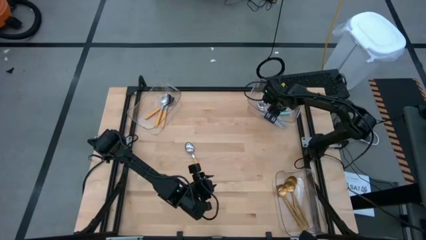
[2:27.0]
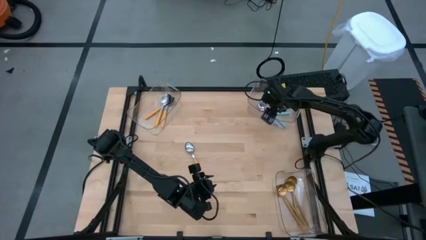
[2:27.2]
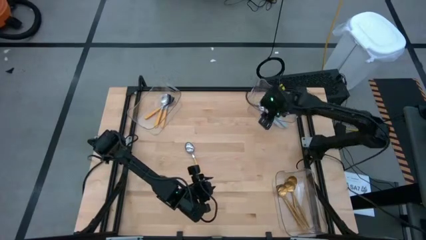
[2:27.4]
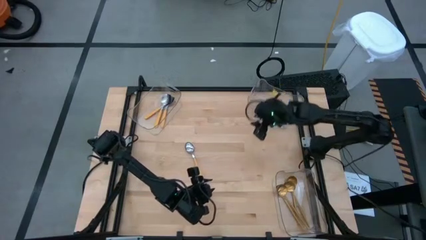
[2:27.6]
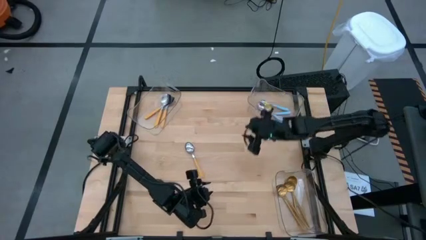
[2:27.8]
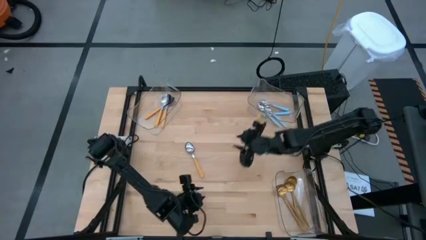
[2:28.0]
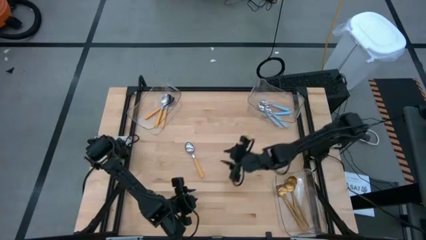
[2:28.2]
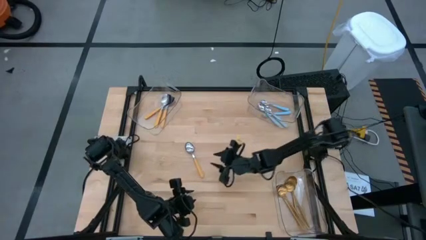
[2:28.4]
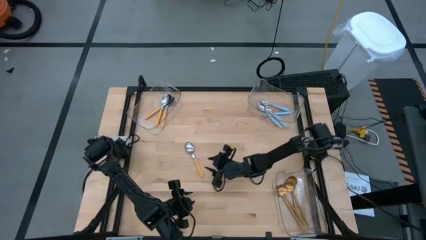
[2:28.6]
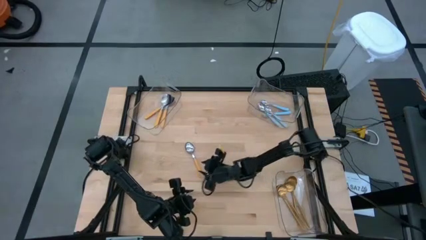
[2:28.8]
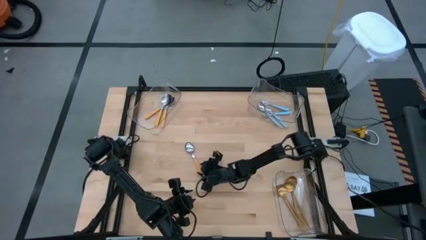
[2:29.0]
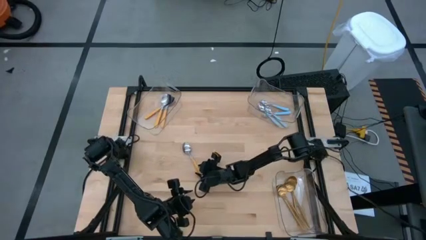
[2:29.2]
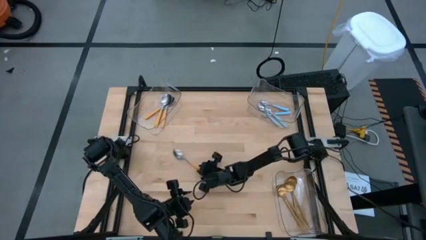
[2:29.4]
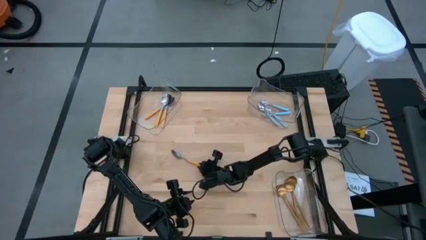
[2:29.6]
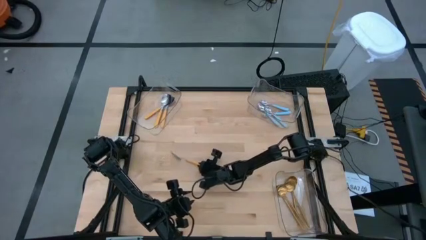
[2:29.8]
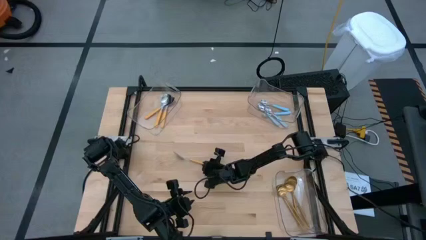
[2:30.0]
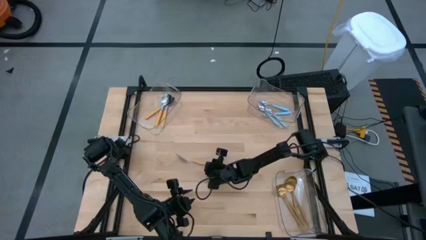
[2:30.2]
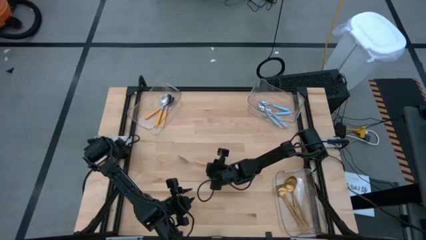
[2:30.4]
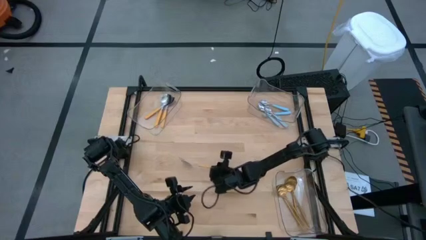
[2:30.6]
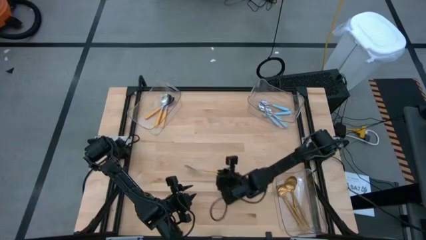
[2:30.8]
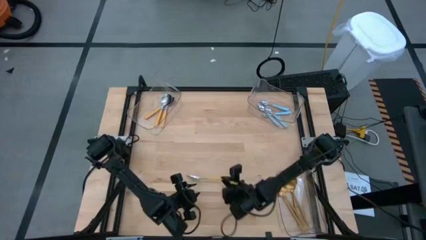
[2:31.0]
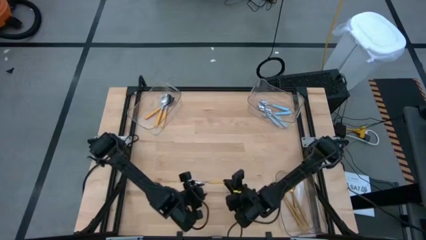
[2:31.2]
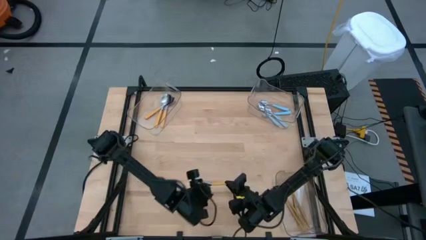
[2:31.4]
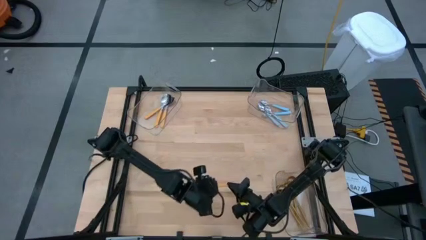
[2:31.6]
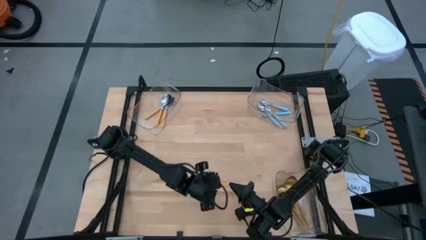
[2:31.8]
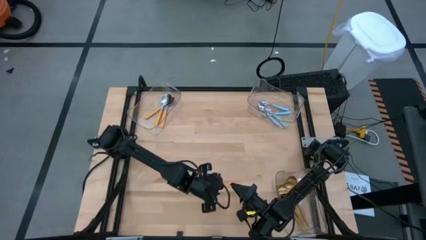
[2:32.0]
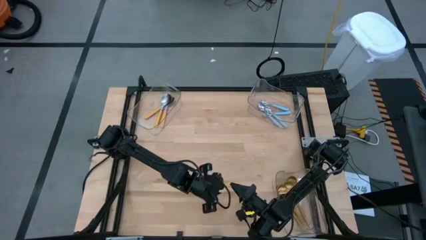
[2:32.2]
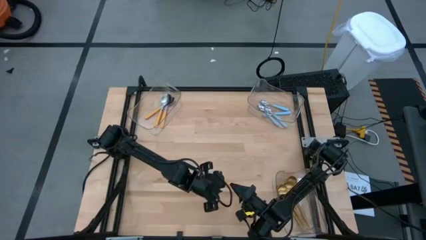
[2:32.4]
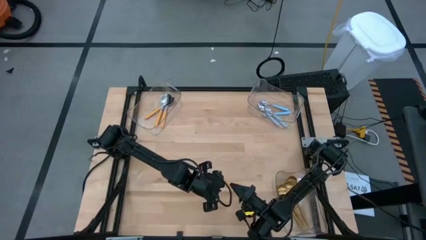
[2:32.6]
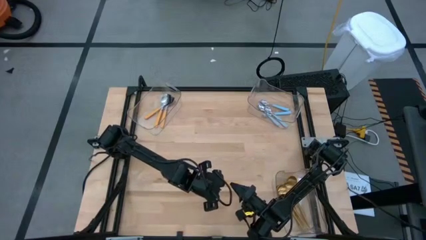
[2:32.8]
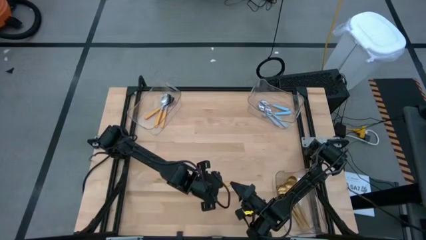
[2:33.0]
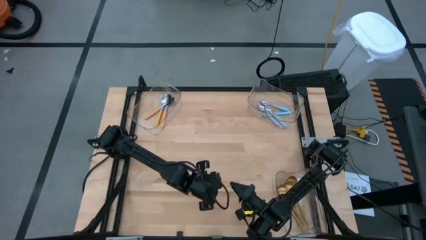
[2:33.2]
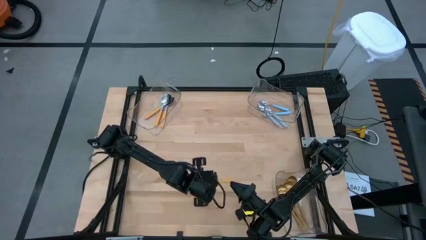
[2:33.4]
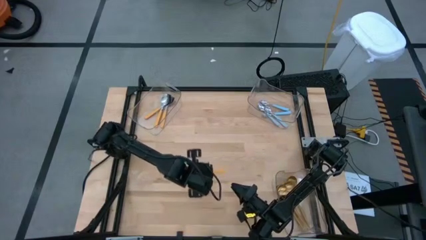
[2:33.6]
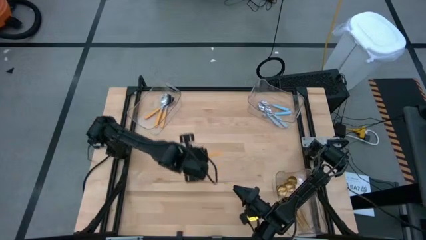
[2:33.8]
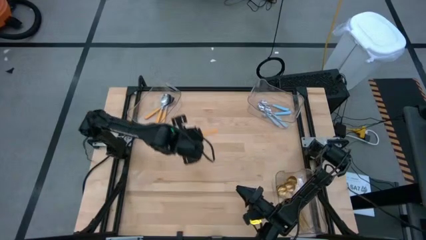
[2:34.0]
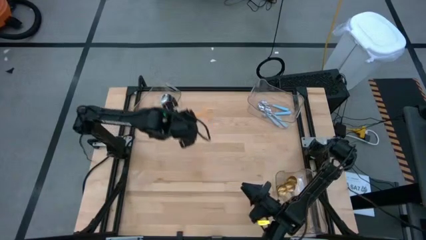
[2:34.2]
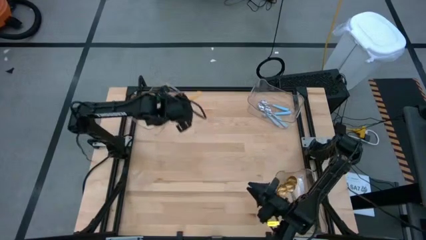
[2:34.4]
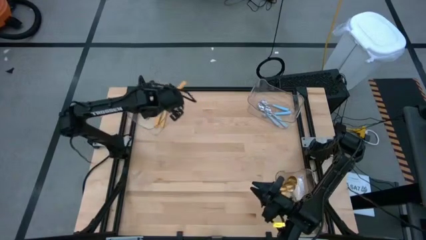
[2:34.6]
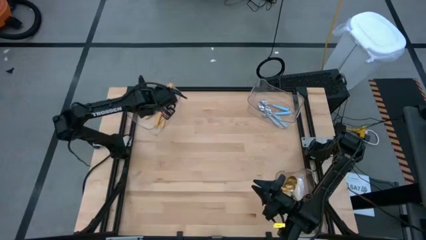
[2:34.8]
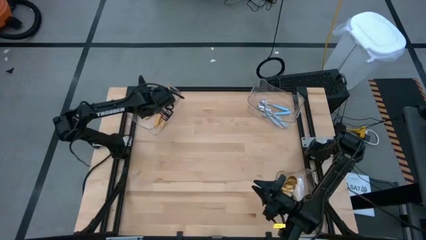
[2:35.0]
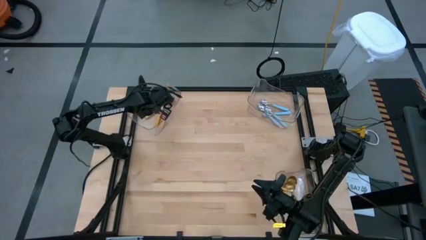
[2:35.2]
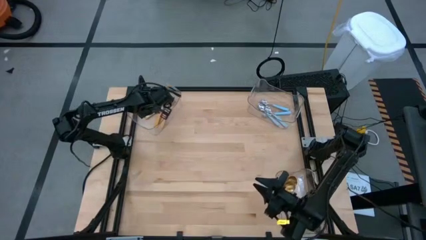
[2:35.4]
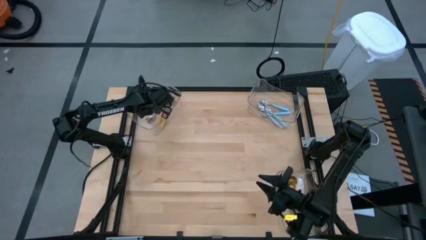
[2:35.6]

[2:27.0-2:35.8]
Task: Sort silverware by color (type)
Put the yellow spoon into the top left transparent bin

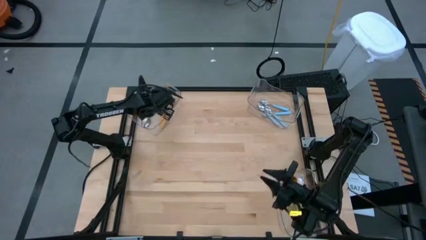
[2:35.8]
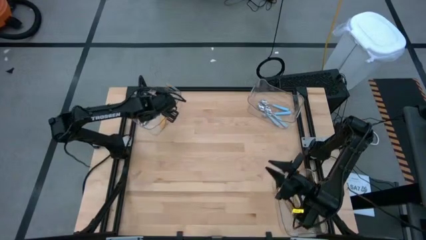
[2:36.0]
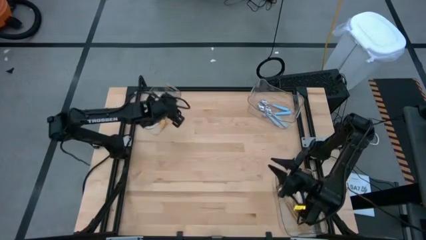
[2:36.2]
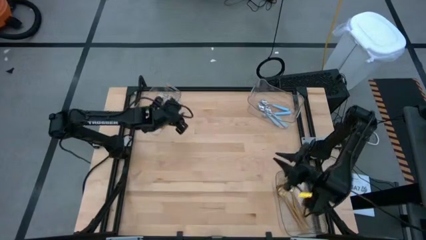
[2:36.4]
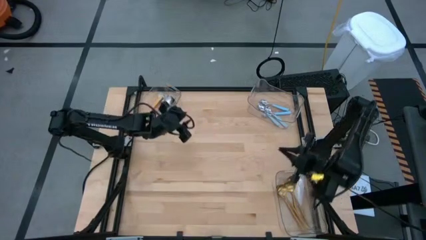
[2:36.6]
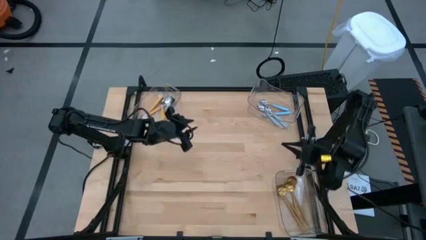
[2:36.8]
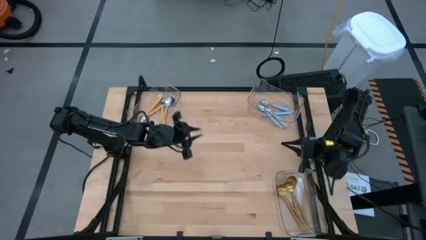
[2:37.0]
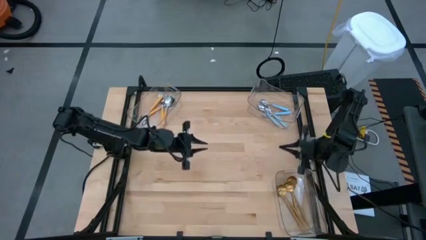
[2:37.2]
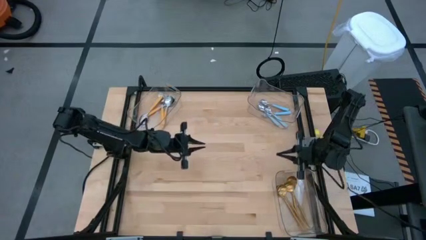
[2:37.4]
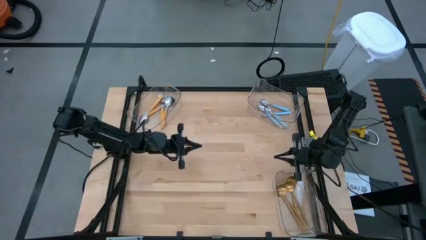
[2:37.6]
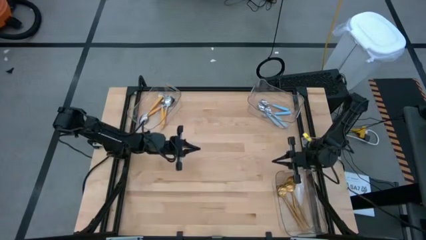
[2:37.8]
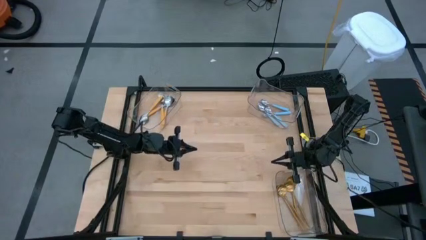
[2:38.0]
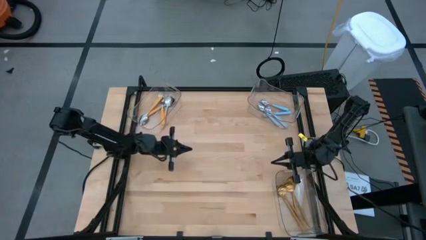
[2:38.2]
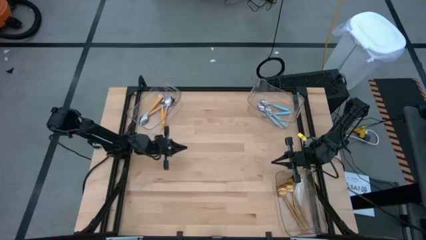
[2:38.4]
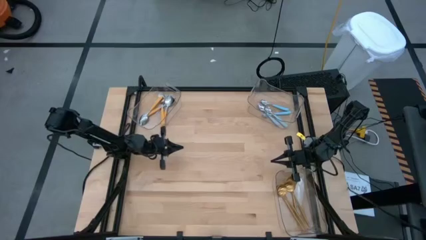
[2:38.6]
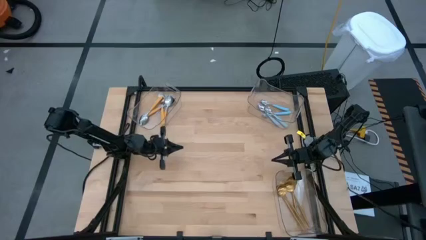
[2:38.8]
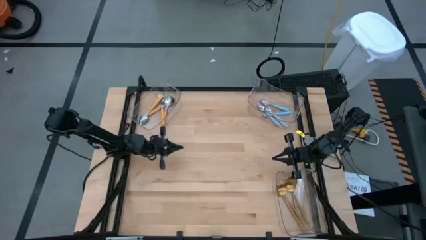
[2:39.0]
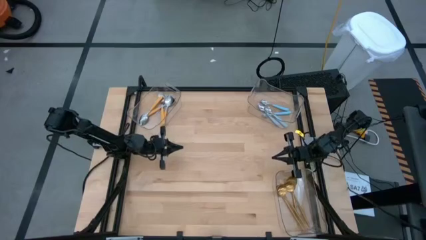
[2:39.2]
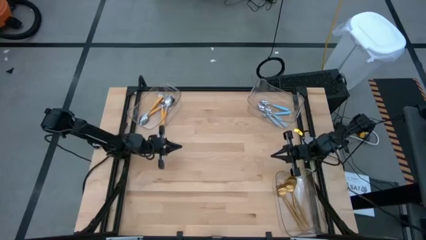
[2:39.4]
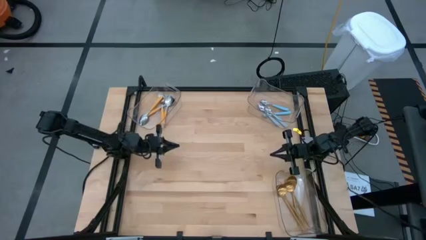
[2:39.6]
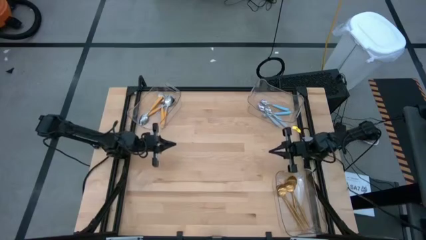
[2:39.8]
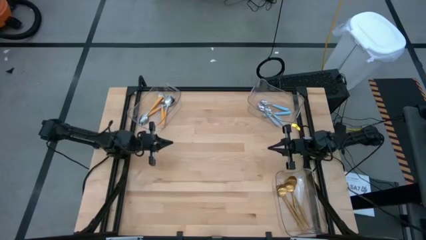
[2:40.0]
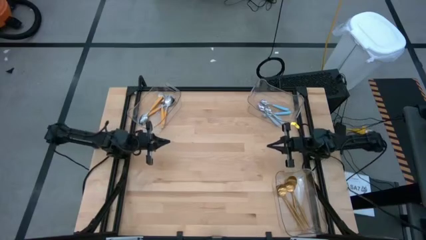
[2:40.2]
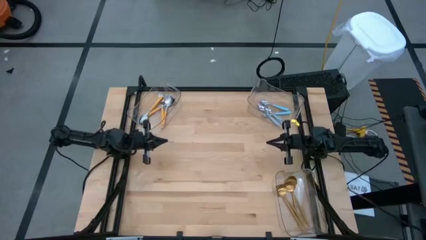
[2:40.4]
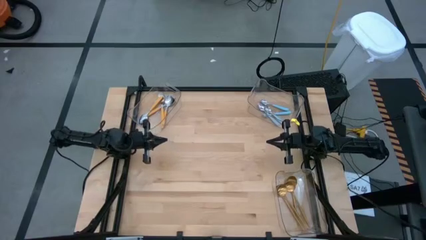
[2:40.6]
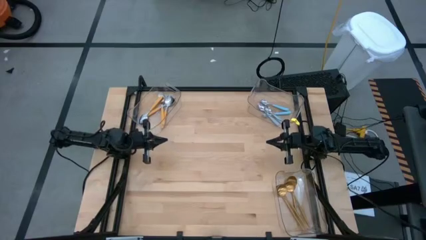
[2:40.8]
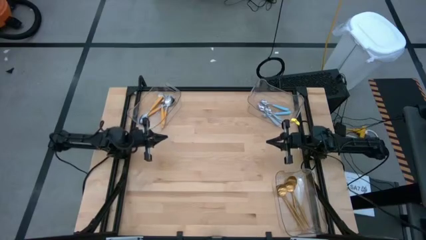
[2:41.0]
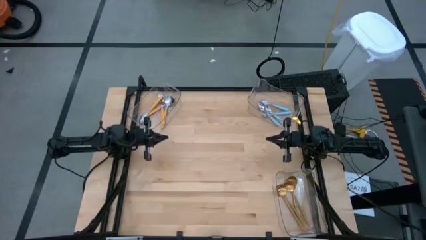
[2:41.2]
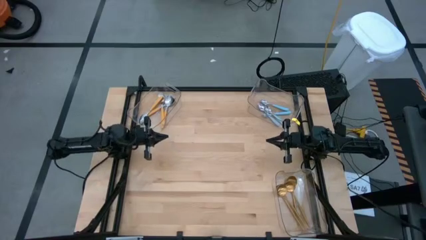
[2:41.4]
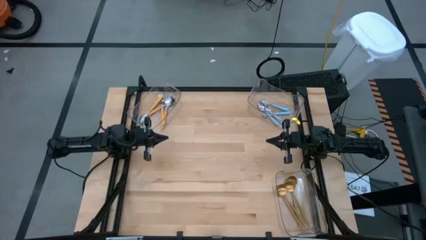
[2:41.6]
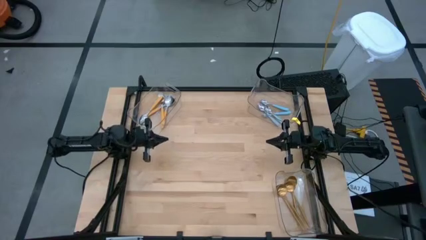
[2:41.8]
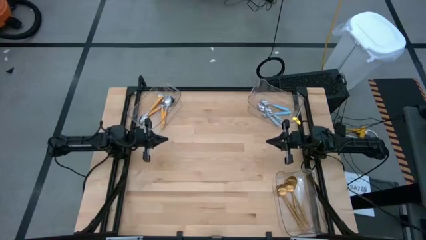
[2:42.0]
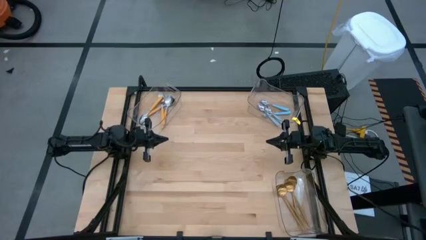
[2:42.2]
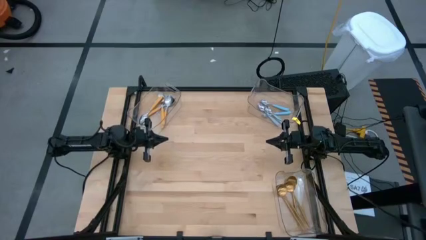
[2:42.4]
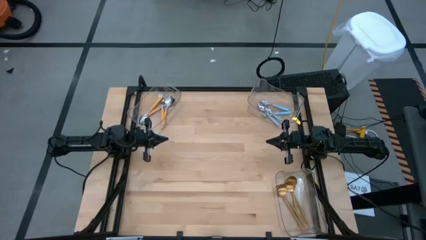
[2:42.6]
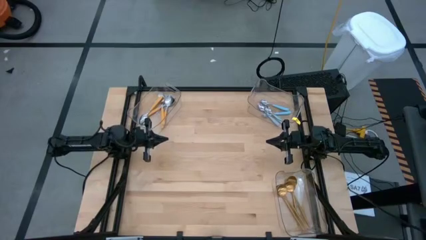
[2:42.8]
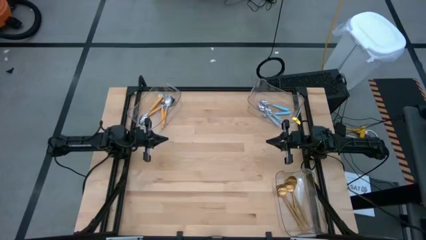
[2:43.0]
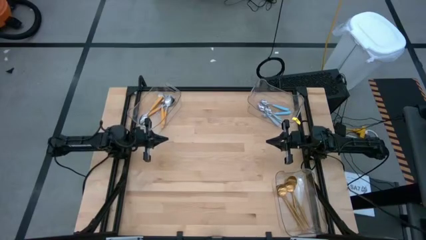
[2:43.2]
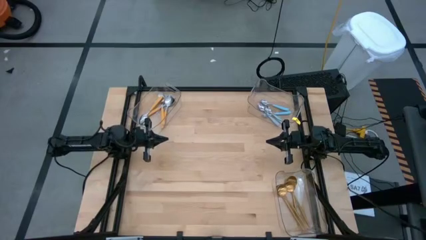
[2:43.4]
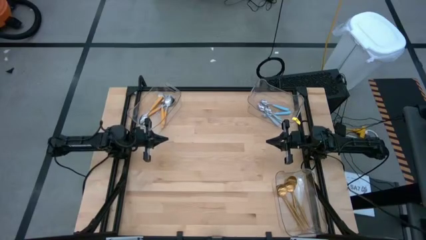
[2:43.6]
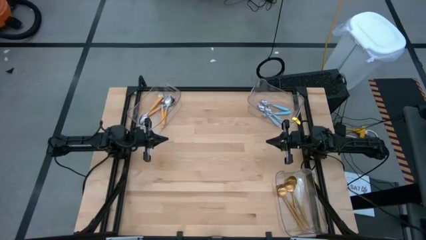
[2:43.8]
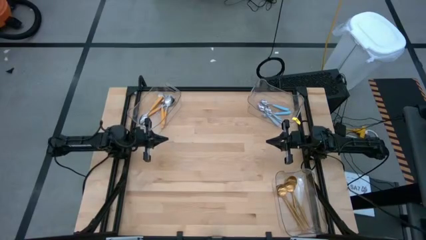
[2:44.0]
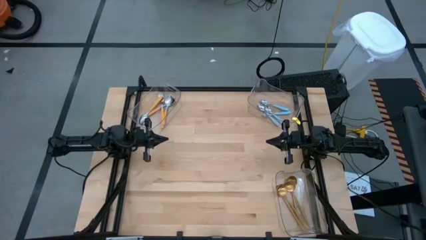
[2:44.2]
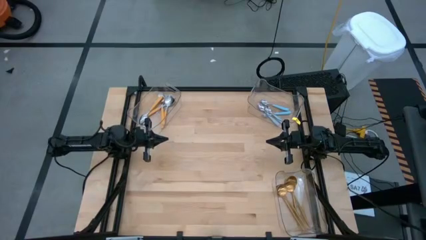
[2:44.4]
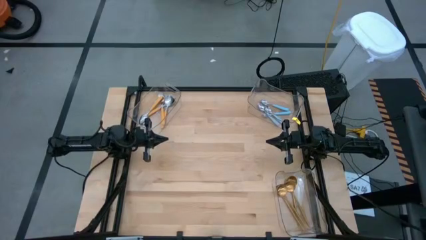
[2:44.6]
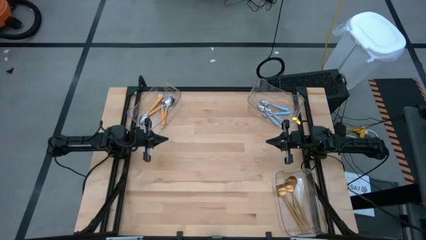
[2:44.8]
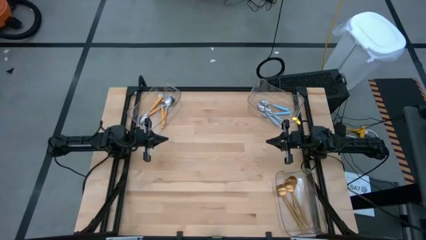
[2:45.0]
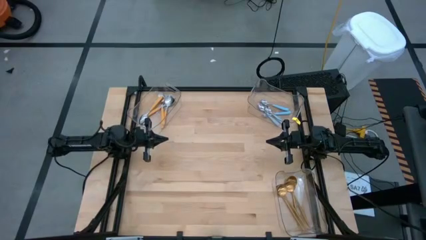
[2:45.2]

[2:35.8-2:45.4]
Return to Home Position
